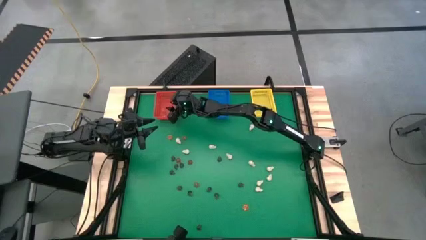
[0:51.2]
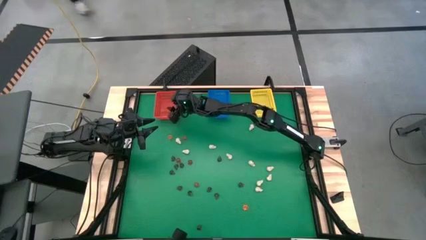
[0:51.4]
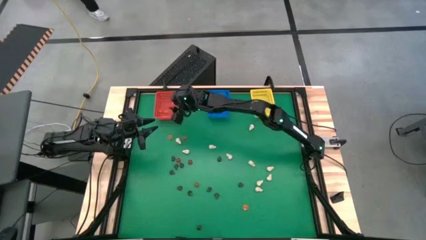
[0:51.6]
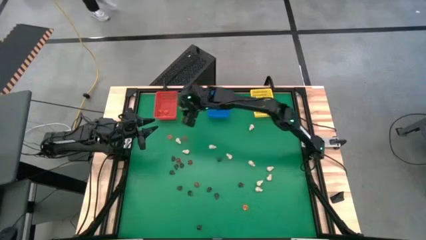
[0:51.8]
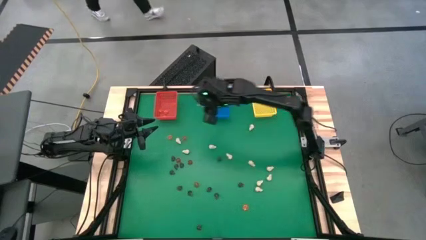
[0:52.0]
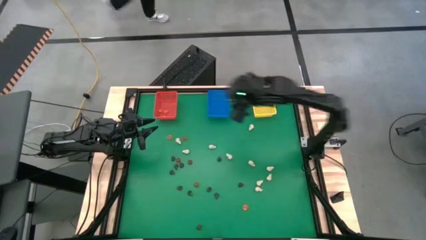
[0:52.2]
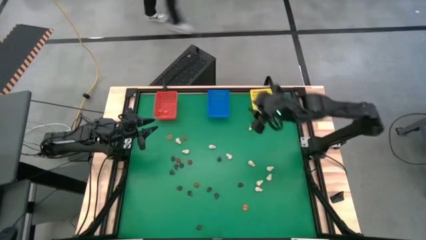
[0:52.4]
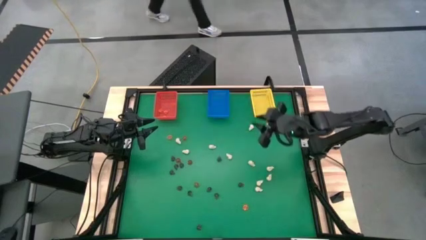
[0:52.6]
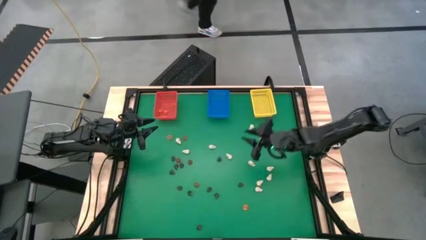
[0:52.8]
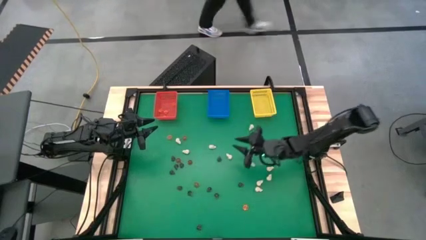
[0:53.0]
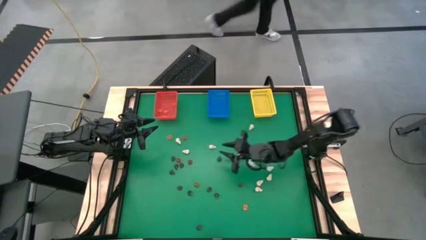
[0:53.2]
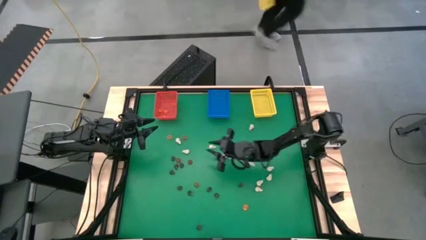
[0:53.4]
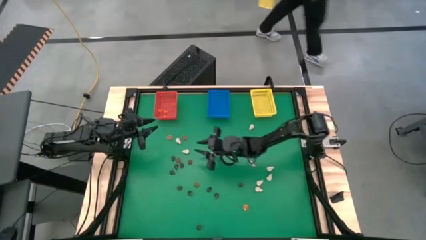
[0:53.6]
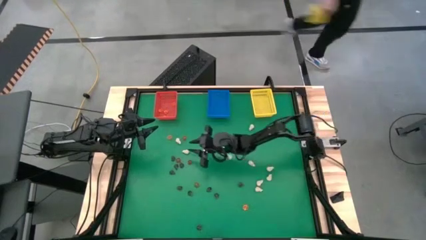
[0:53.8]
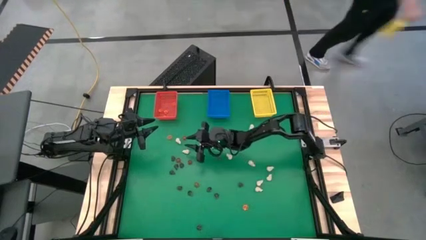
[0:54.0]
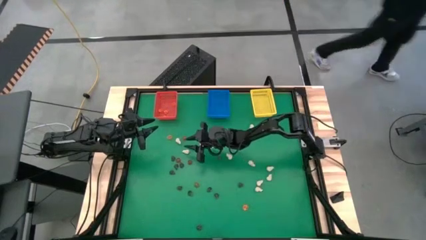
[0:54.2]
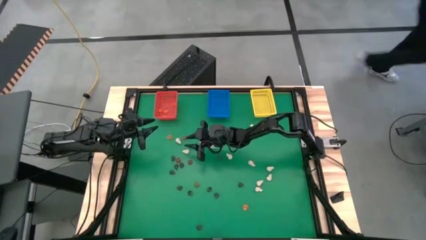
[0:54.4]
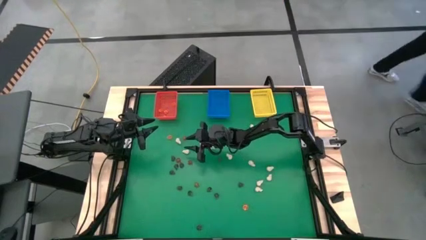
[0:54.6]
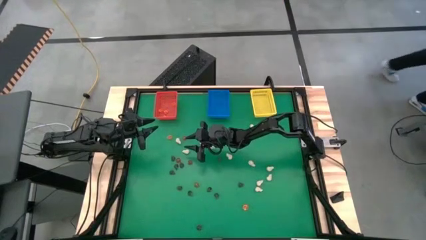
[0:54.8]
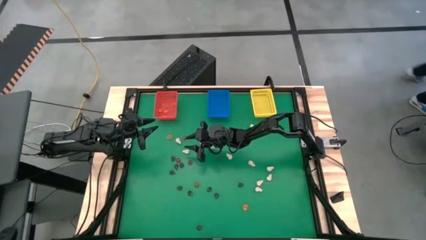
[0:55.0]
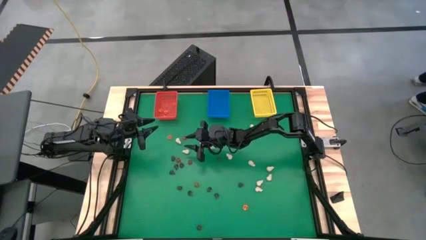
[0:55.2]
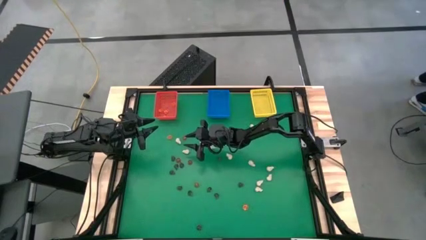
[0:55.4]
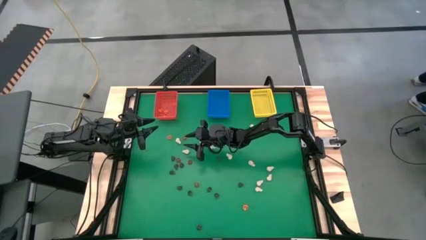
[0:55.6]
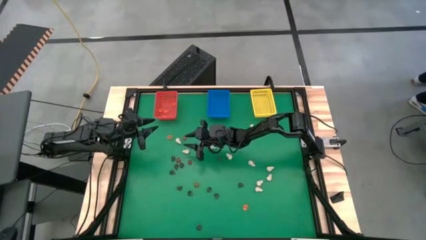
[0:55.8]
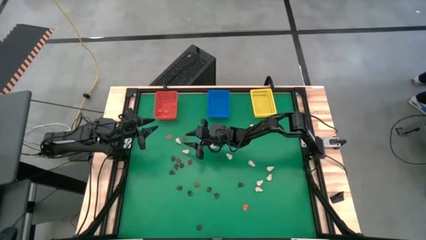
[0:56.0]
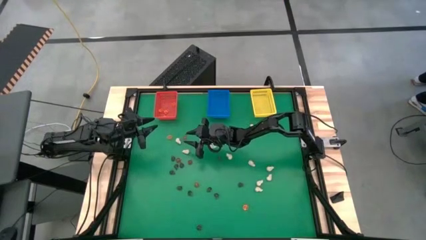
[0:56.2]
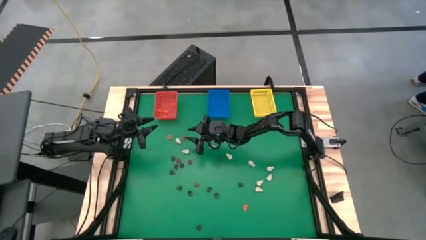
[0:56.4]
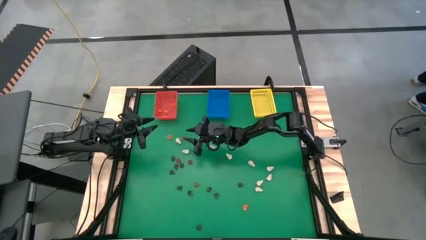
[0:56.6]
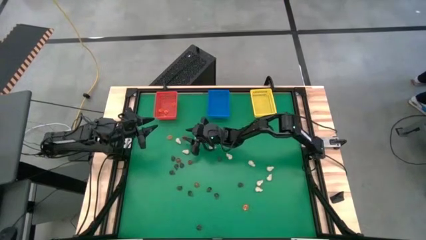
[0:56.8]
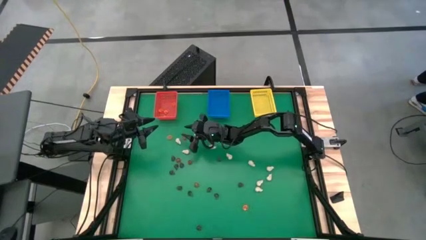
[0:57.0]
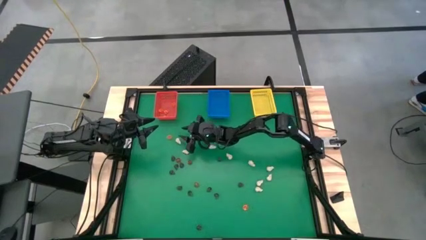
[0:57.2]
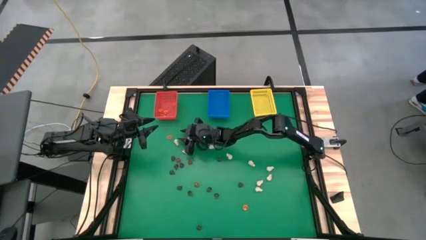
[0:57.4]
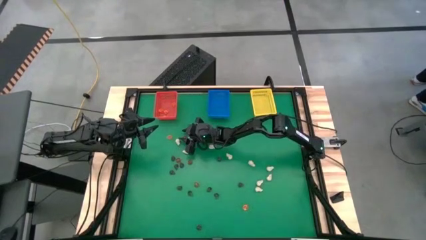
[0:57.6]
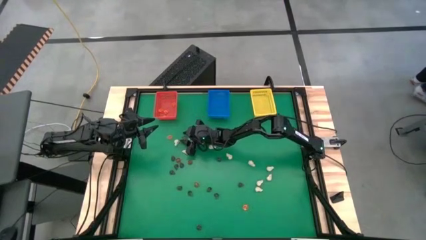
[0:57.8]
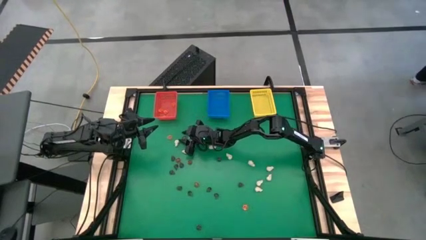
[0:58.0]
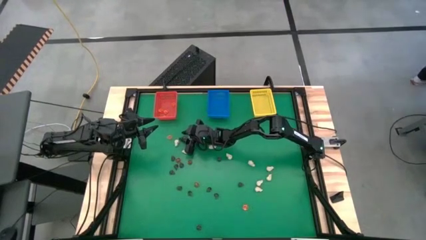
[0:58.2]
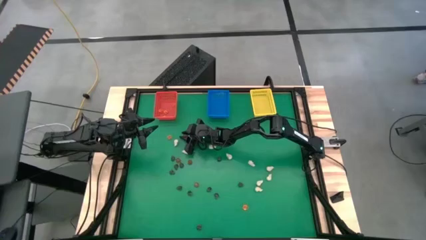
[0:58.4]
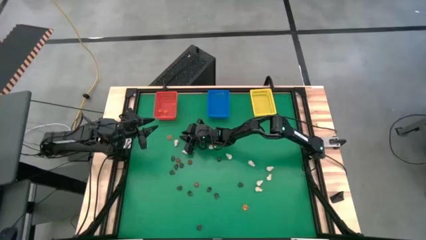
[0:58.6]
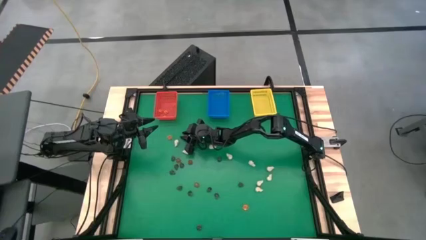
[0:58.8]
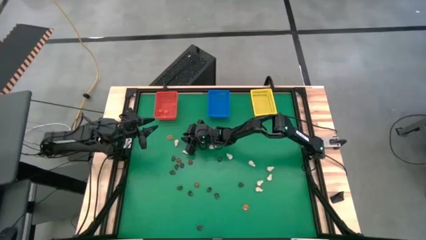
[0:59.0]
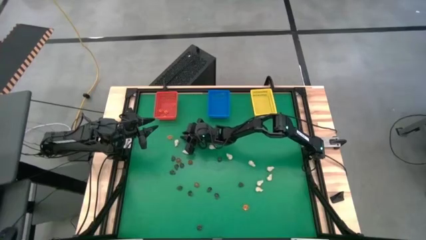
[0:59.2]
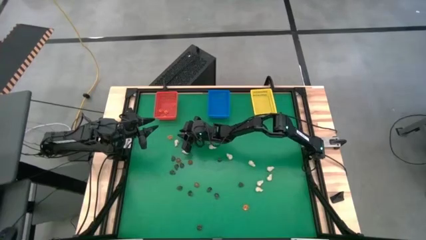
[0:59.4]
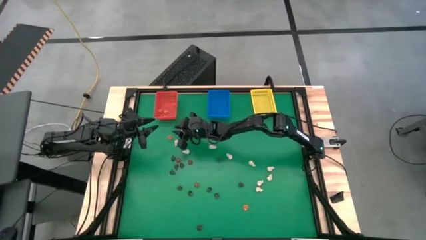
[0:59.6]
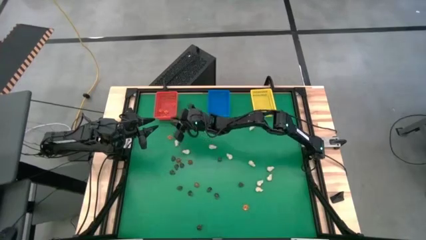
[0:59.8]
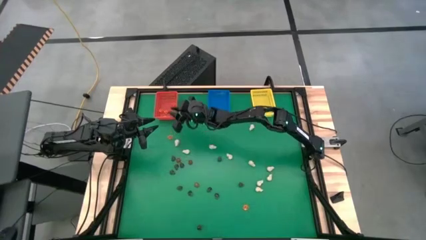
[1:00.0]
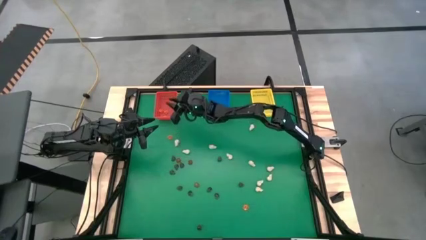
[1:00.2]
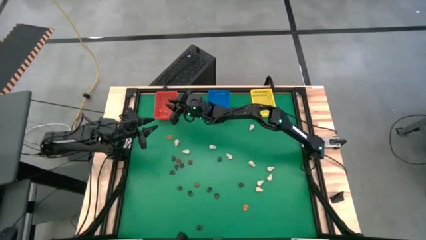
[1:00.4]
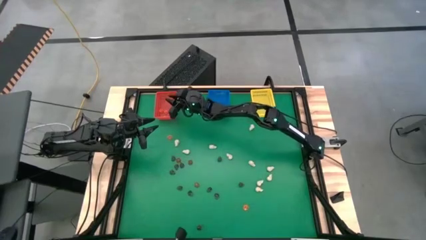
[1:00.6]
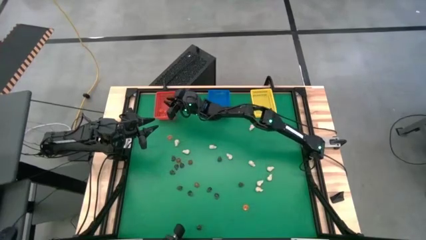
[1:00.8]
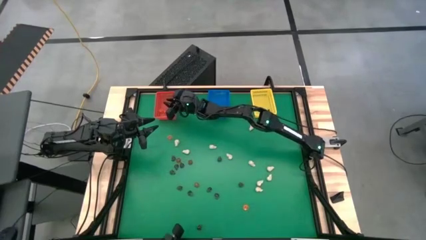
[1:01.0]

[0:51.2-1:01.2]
Task: Sort Halloween decoration
Put the orange pumpkin toy into the red bin

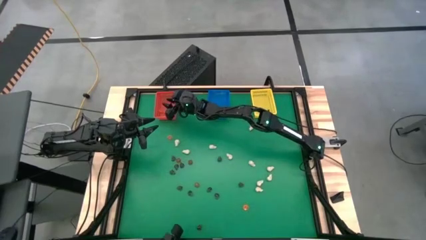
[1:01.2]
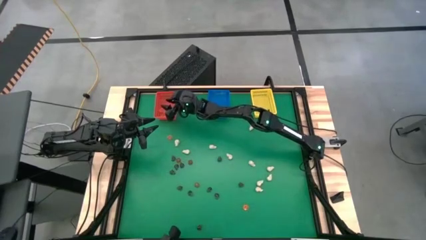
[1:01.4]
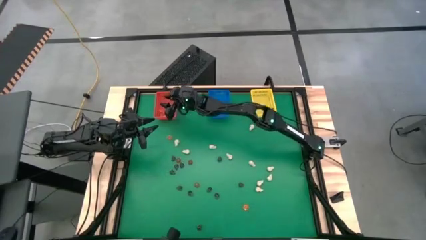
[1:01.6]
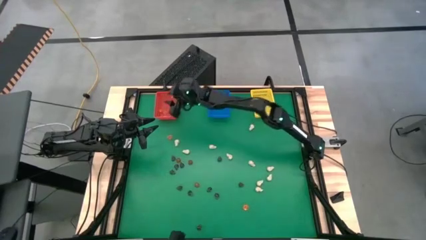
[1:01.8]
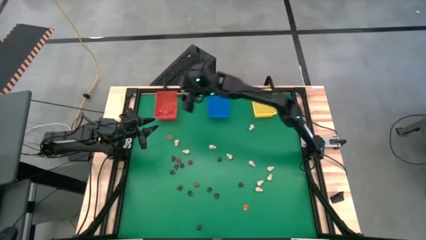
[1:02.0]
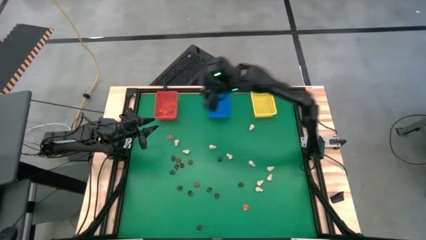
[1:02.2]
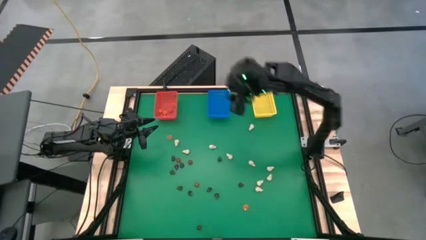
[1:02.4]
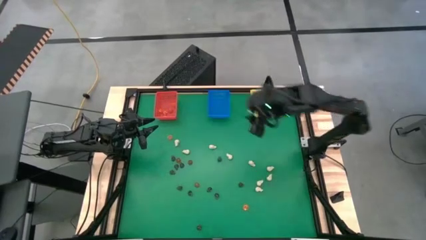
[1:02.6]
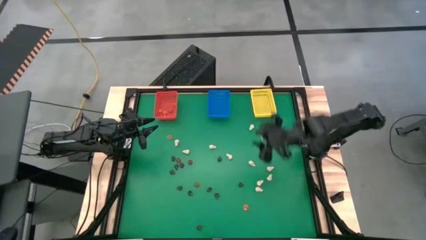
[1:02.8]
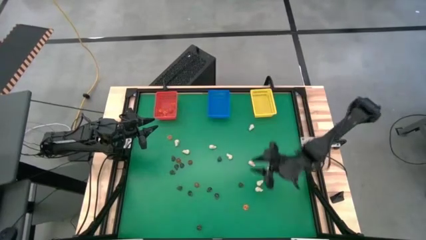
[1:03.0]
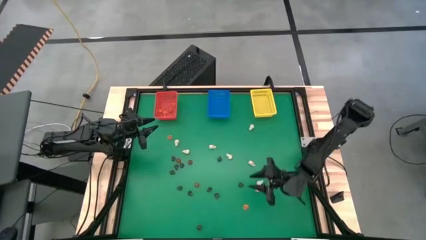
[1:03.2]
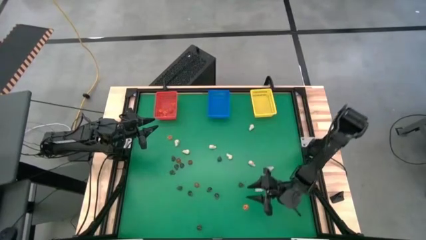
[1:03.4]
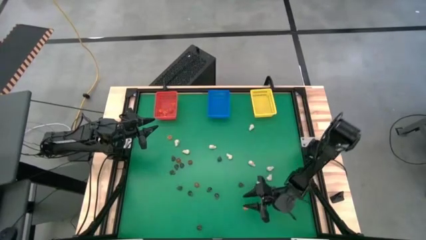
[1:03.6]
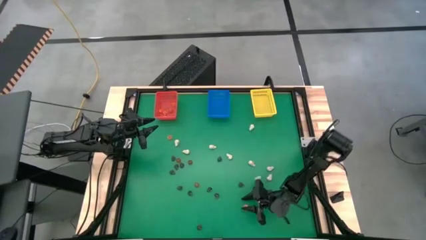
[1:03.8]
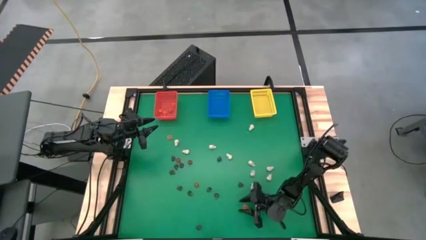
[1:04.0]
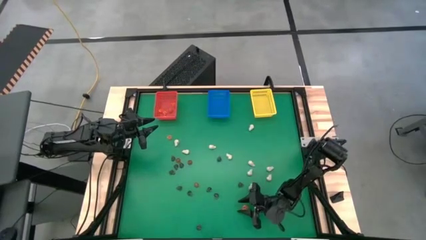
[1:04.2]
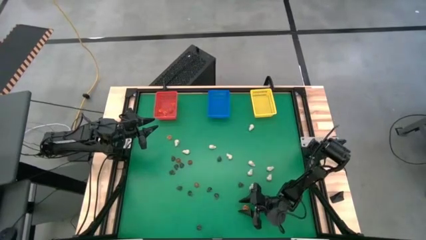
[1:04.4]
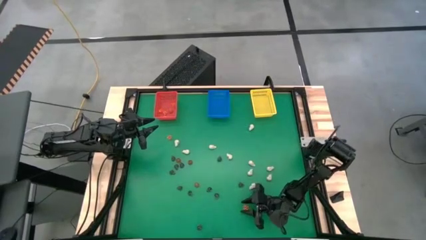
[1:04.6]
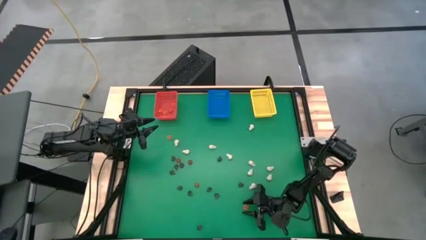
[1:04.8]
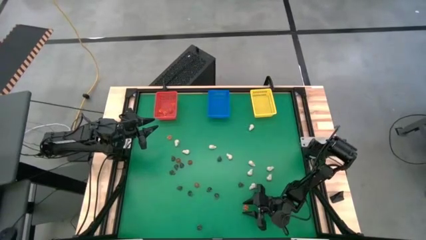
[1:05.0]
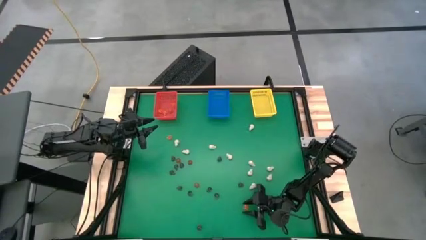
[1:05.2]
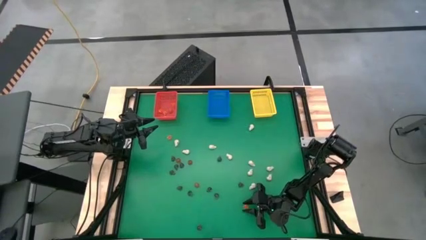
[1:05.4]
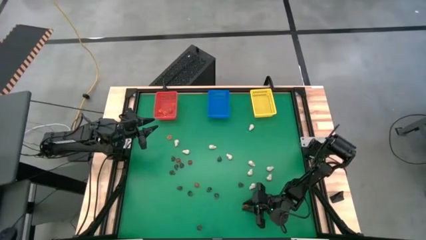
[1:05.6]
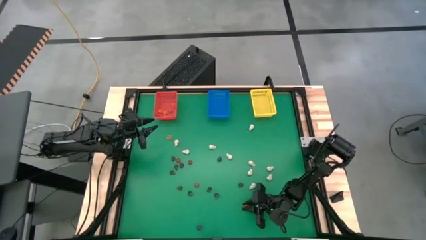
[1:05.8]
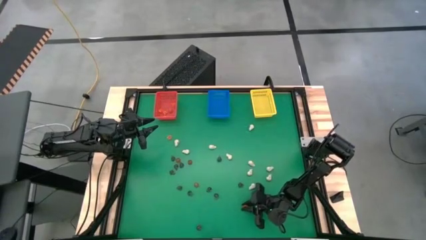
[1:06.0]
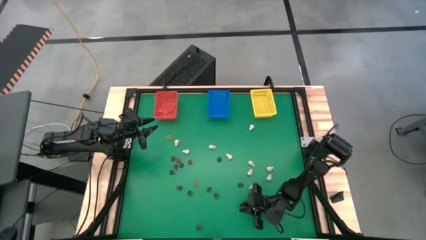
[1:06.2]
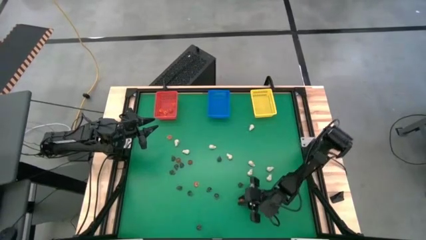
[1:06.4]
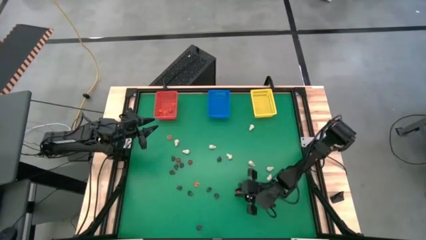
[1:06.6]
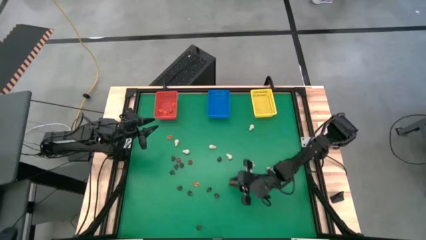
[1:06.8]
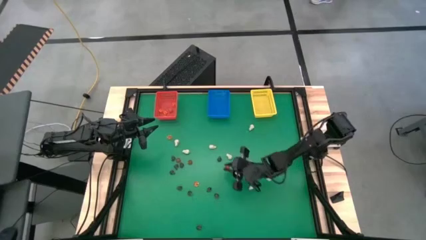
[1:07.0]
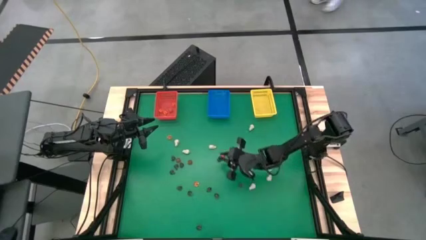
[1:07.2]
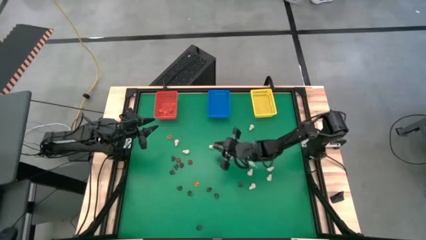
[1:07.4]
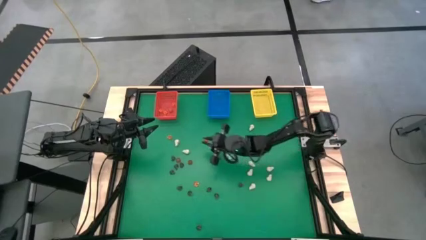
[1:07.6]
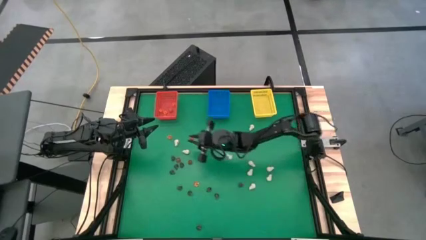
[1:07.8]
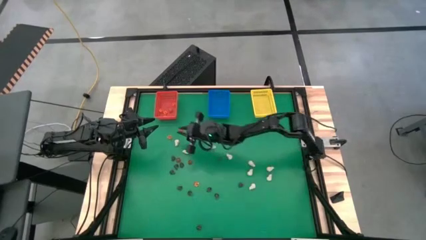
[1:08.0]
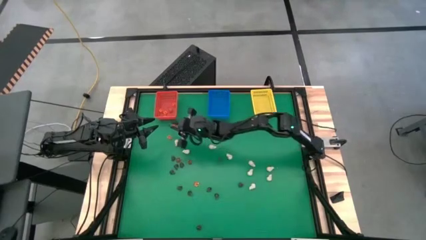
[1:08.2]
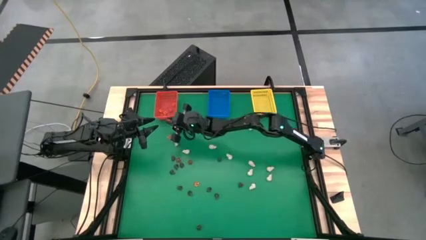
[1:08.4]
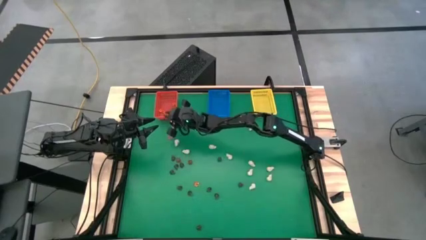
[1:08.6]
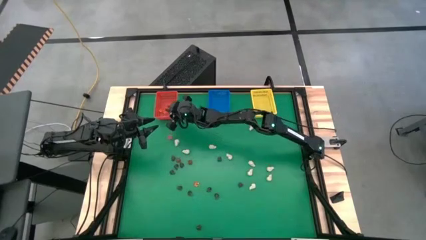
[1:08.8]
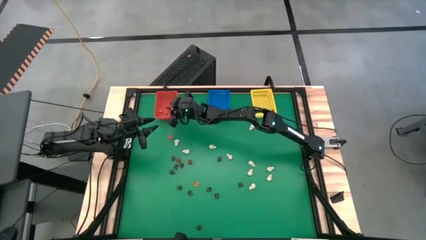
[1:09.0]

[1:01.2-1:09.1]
Put the orange pumpkin toy into the red bin
